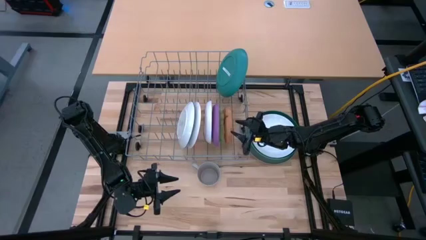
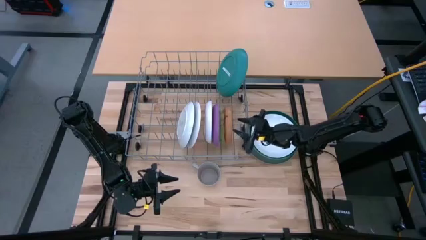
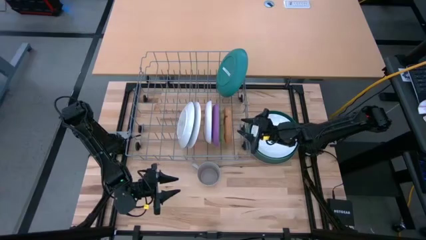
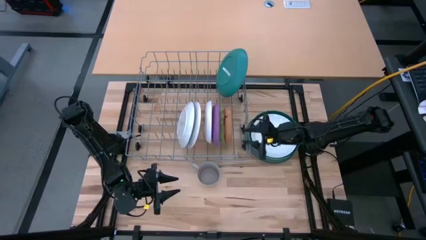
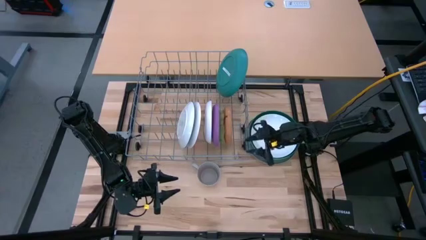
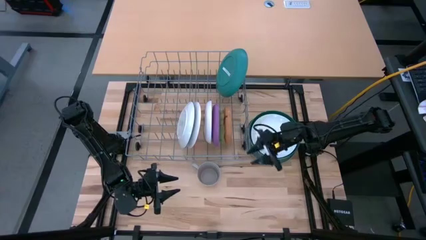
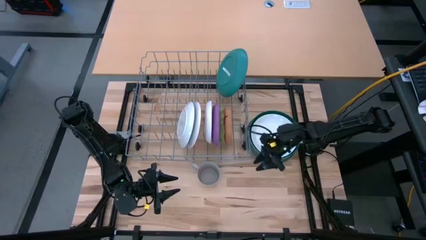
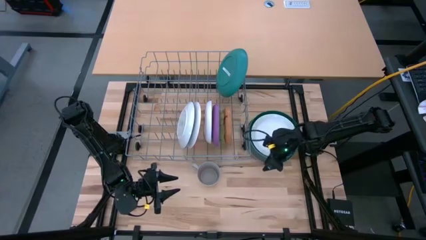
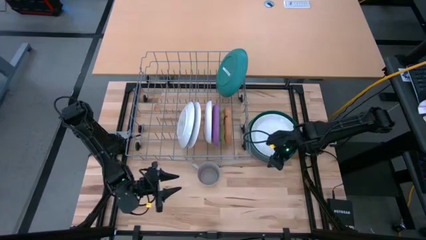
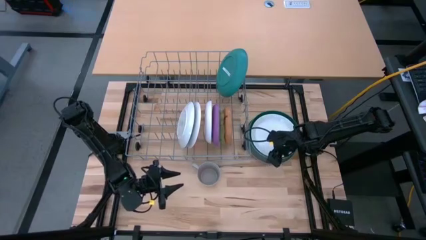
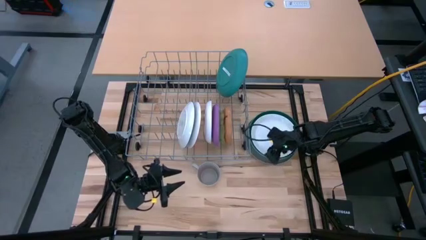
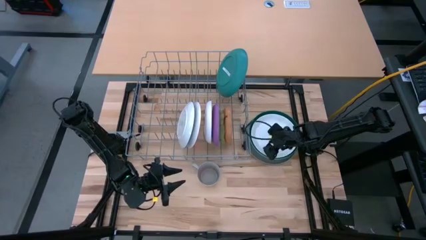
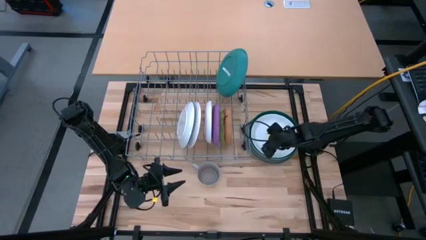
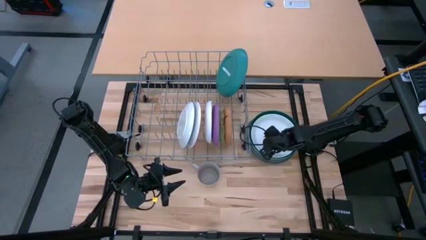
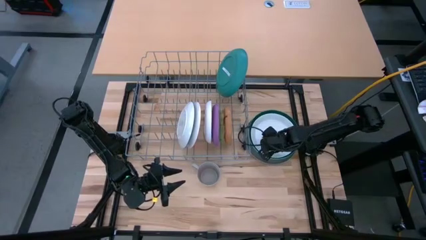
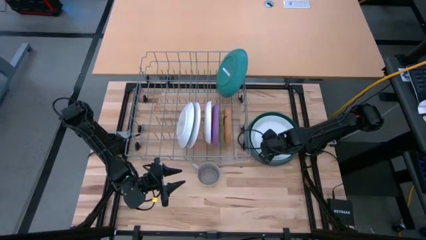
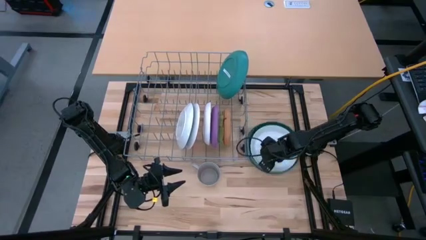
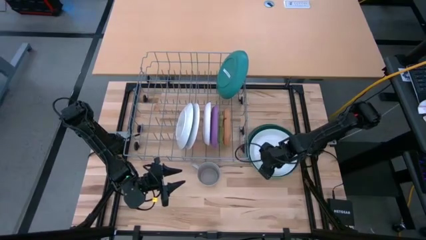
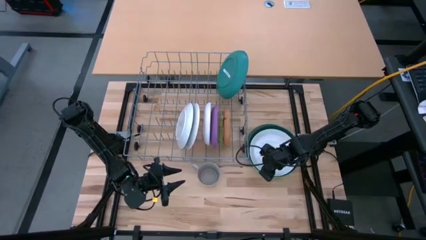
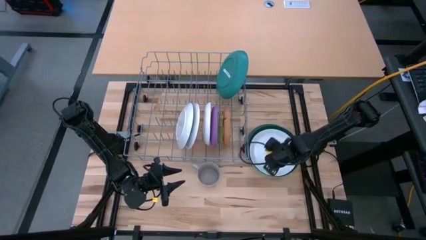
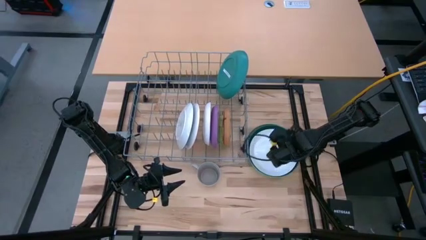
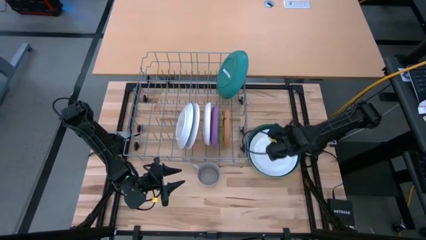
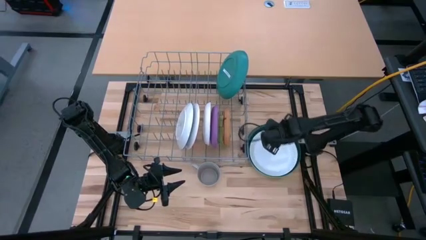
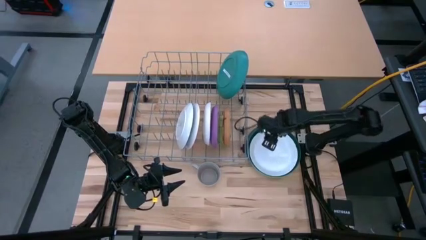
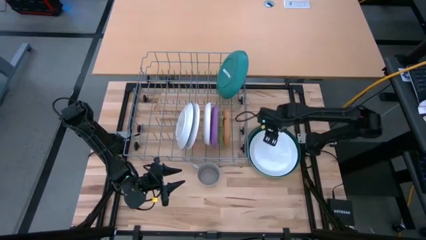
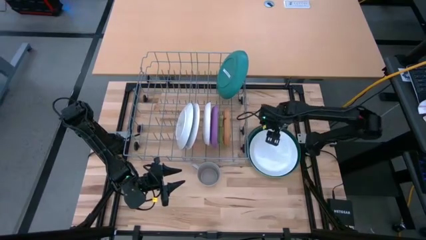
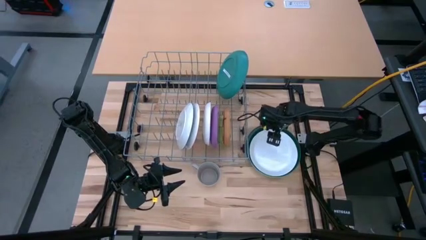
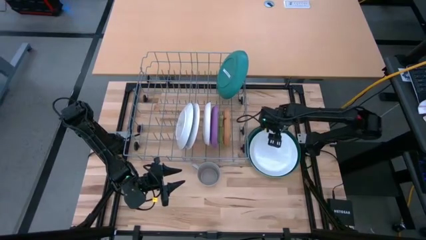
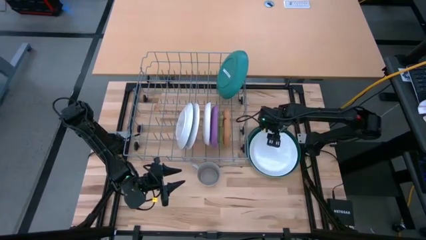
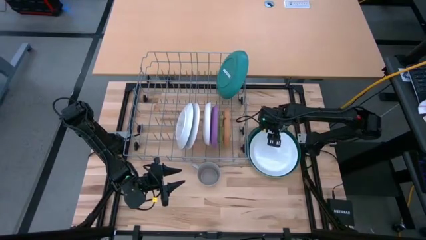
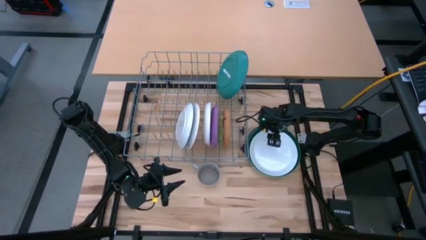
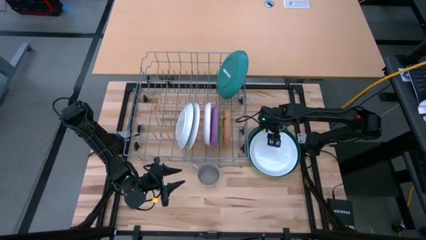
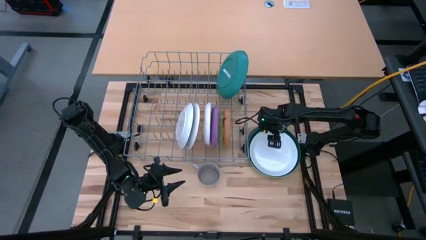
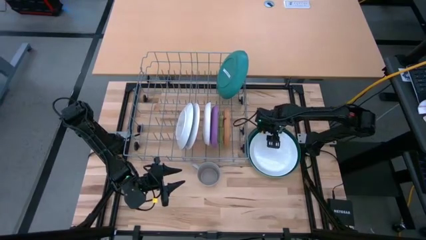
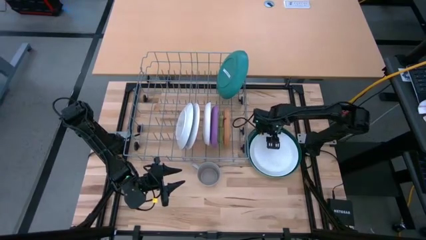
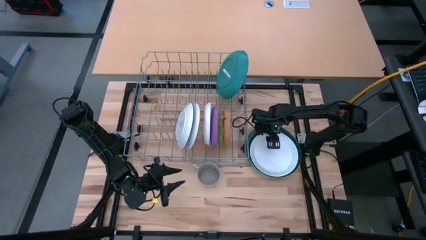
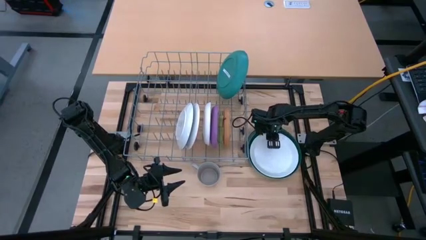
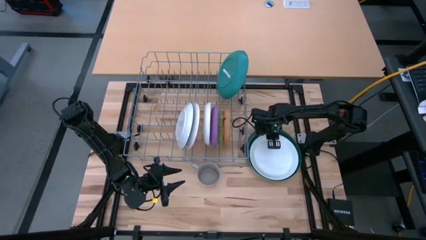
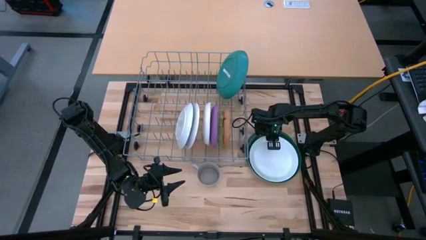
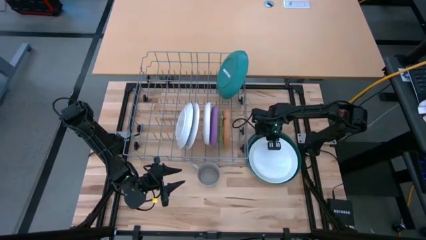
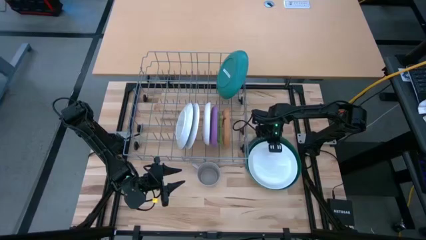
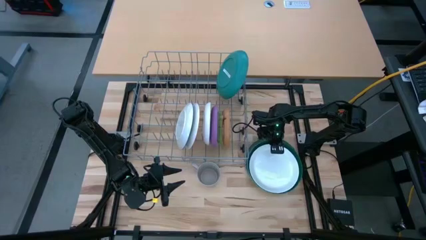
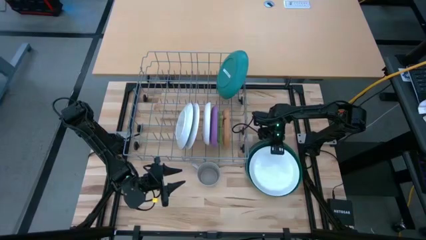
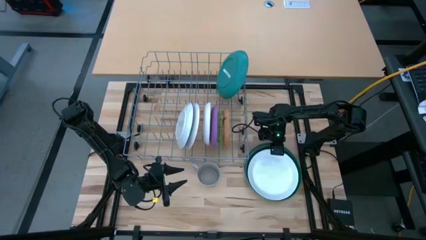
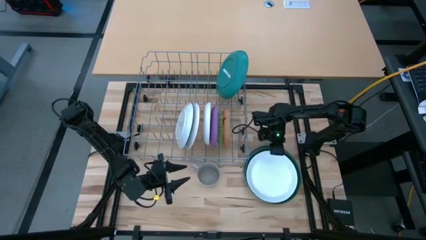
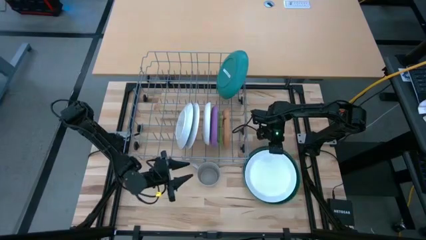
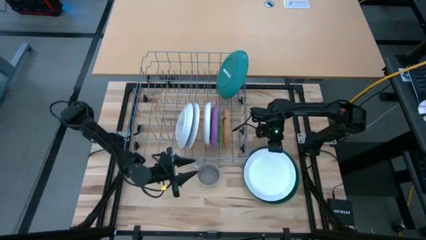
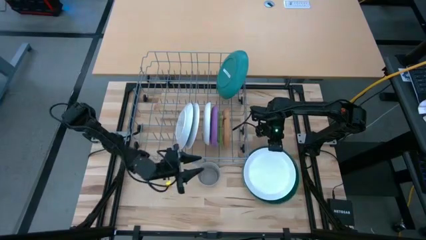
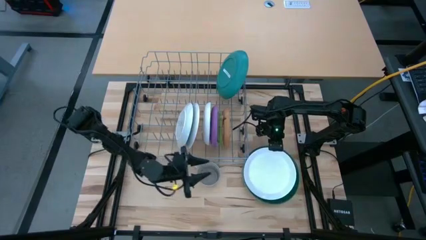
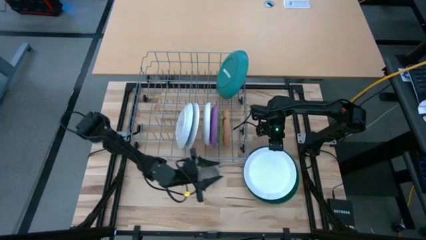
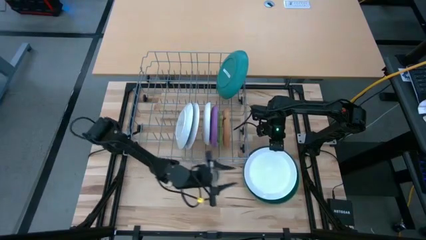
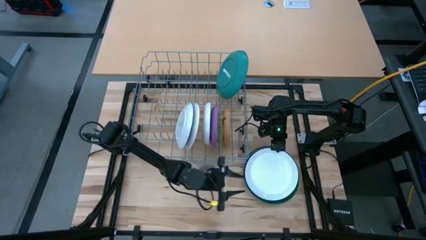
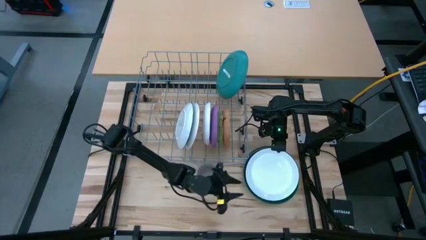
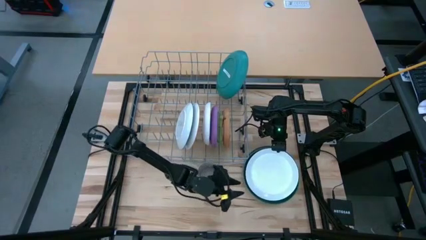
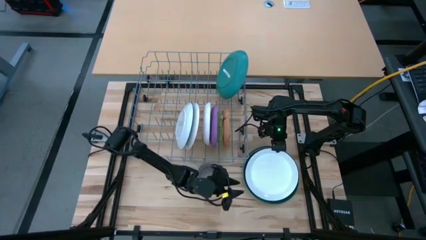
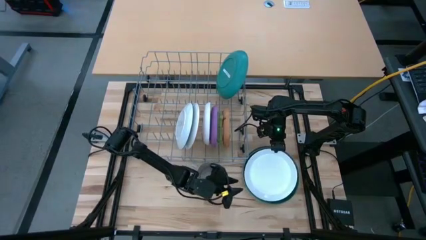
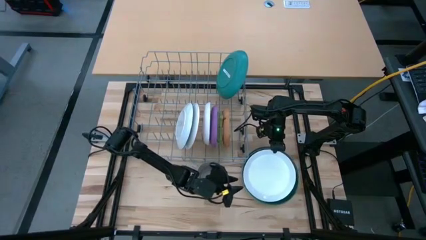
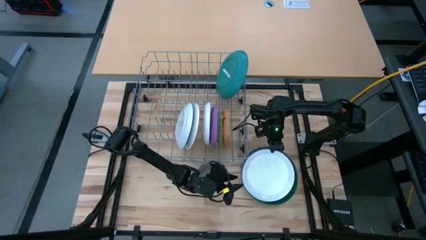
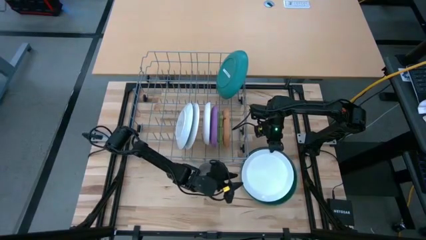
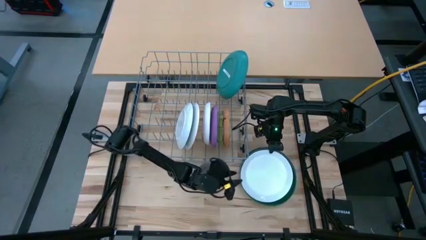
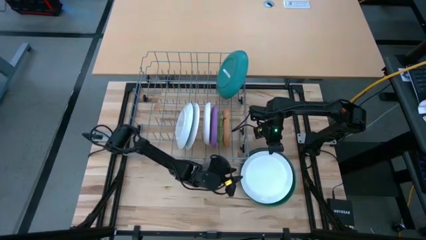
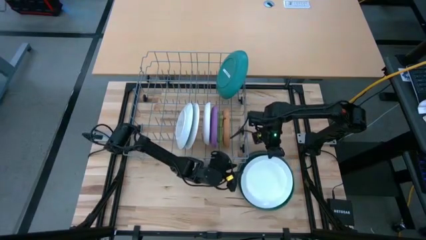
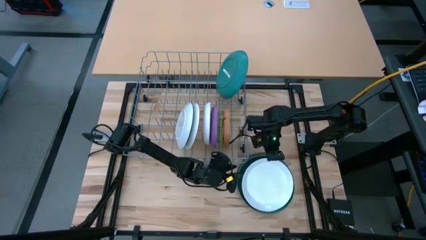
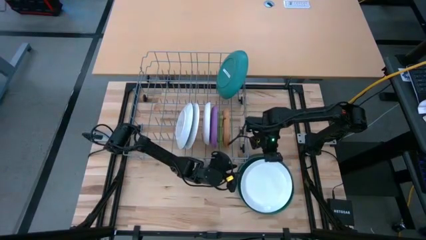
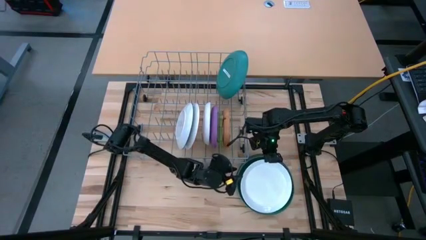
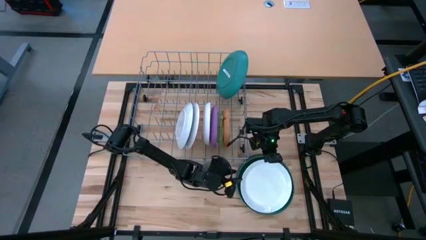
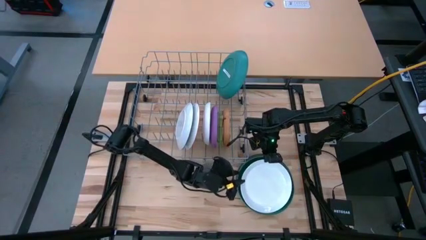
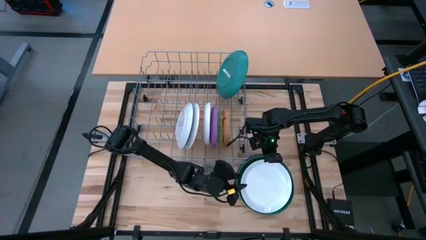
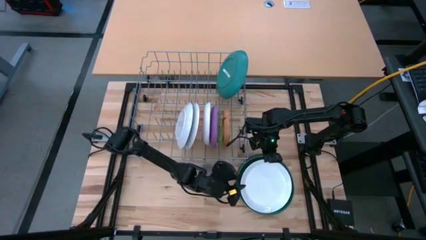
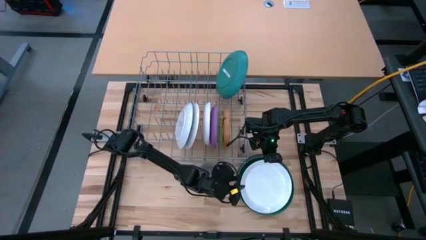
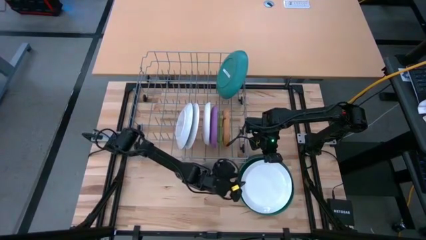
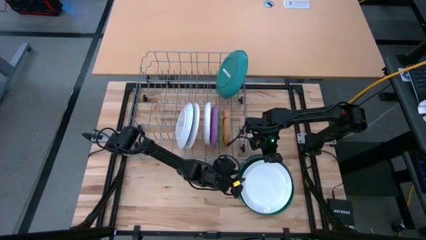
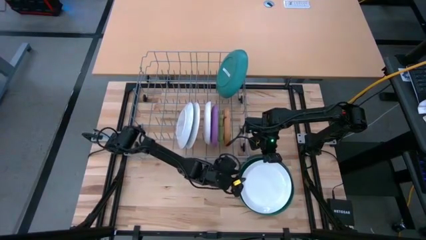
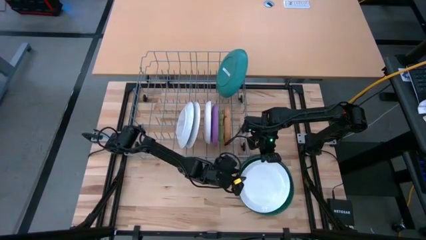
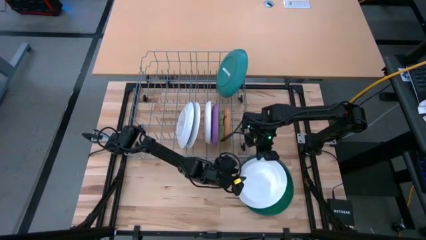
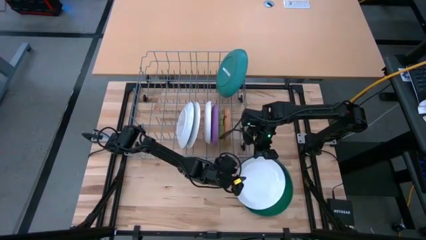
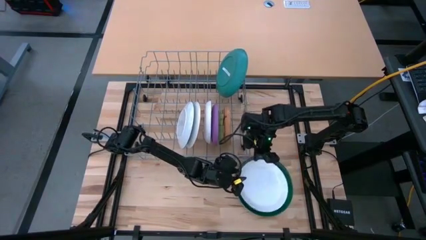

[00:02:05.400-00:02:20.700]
Task: Sort dishes
Put the white plate in the dish rack
